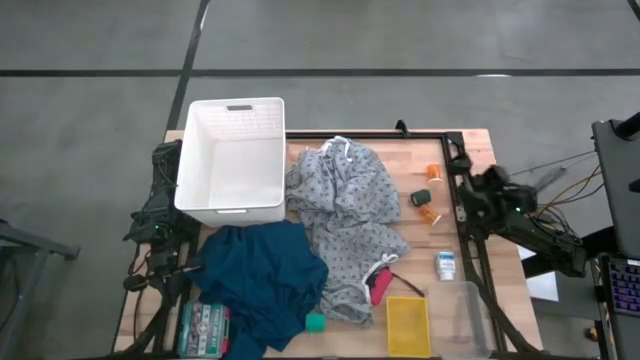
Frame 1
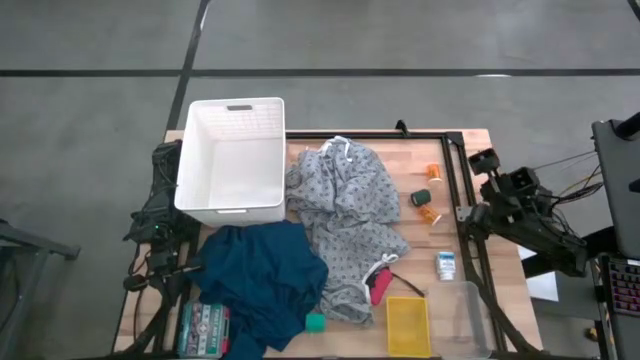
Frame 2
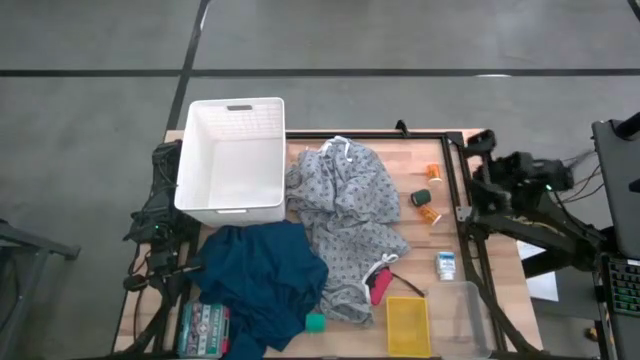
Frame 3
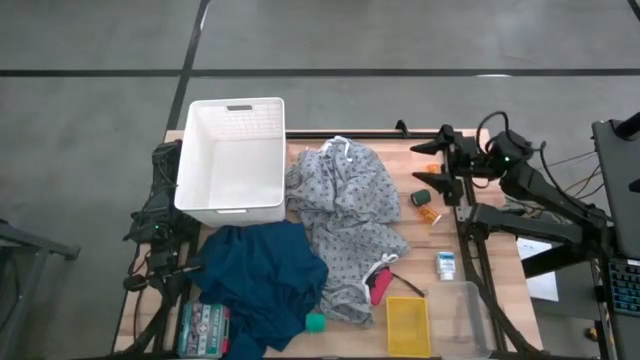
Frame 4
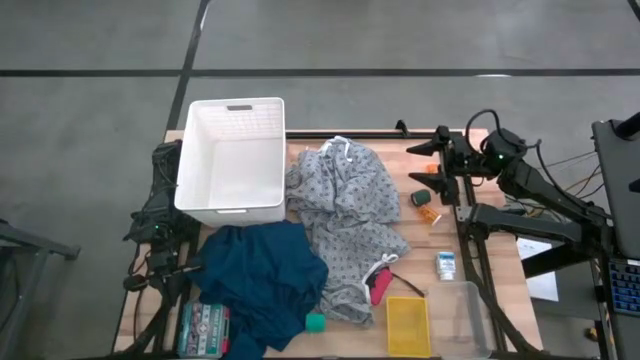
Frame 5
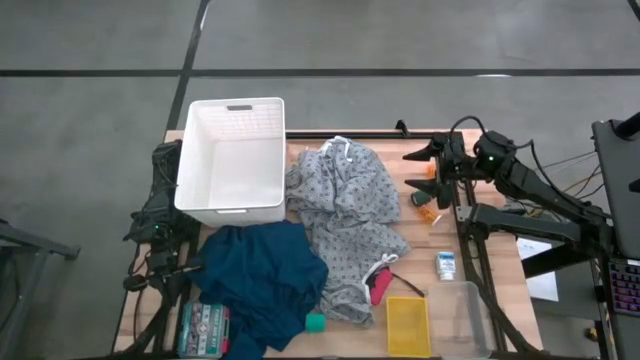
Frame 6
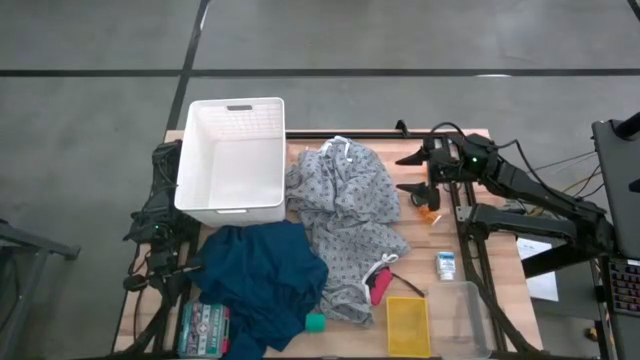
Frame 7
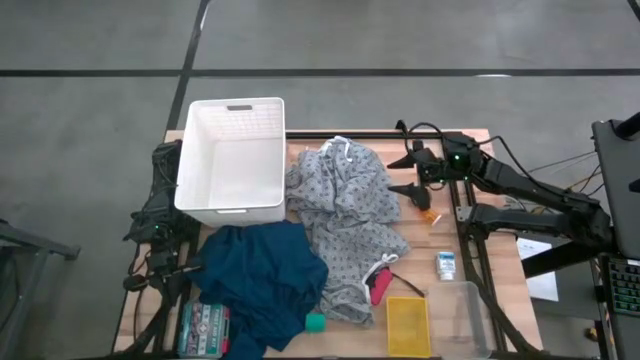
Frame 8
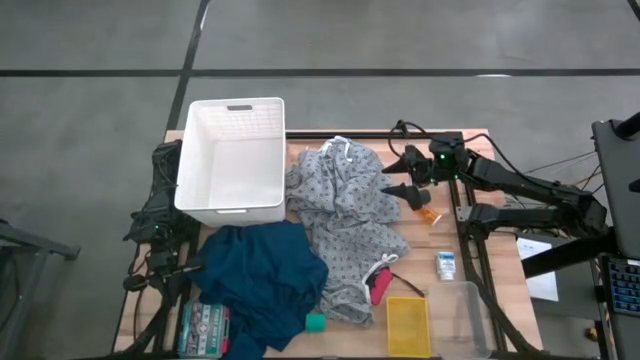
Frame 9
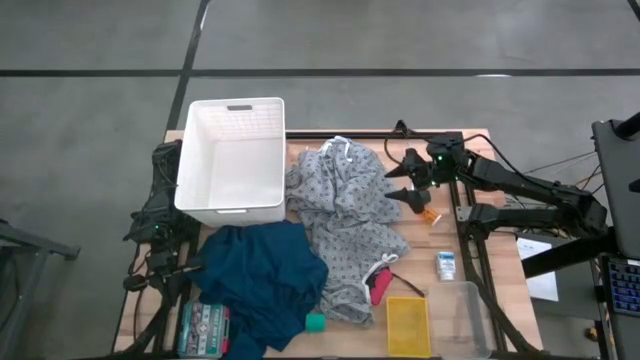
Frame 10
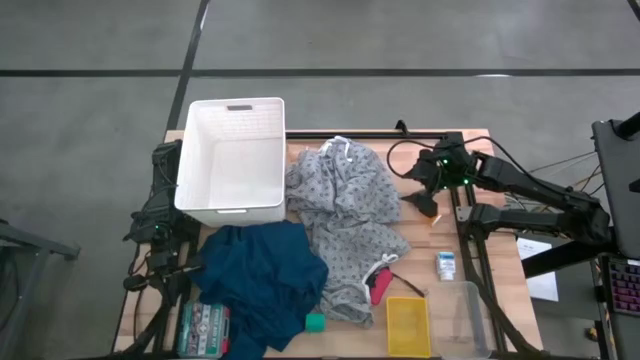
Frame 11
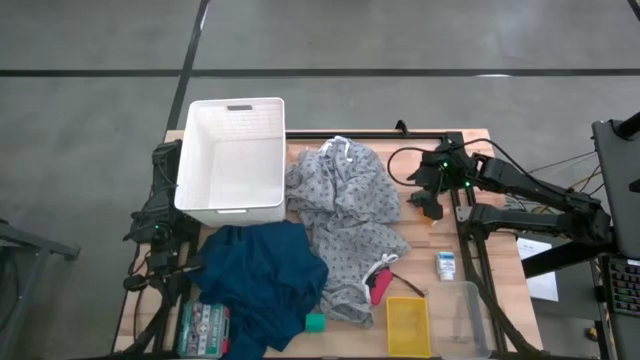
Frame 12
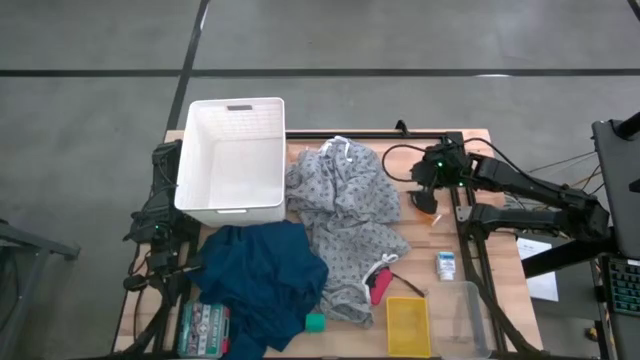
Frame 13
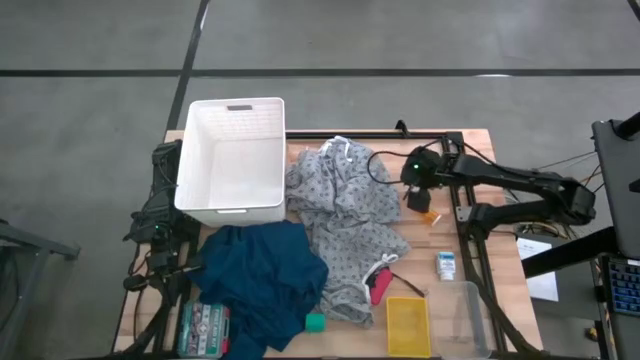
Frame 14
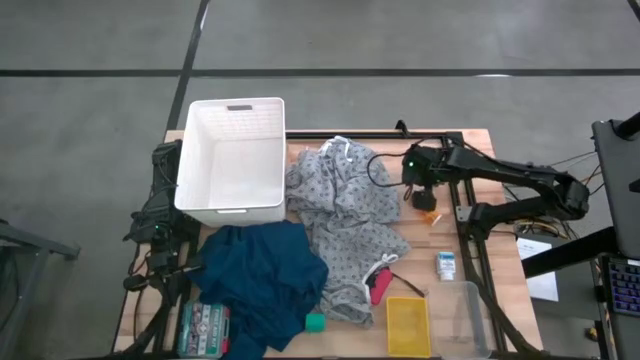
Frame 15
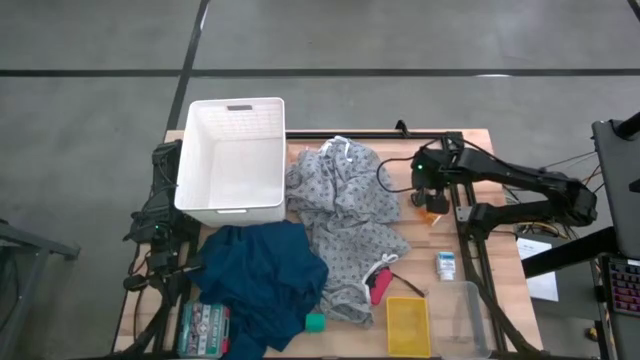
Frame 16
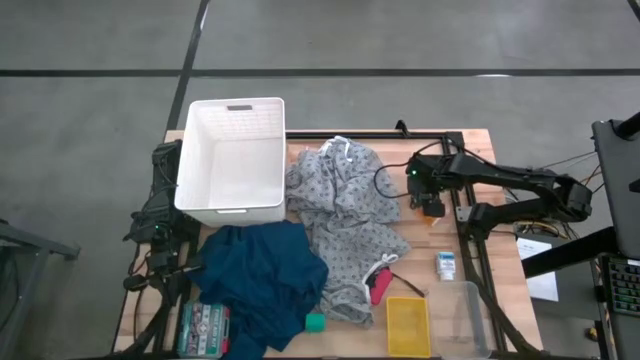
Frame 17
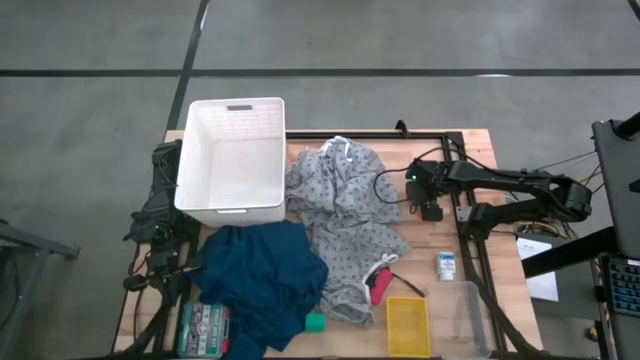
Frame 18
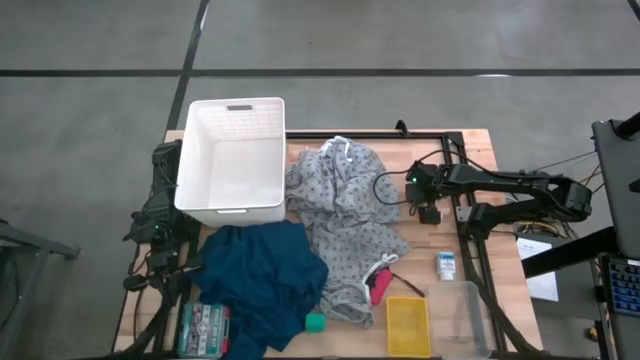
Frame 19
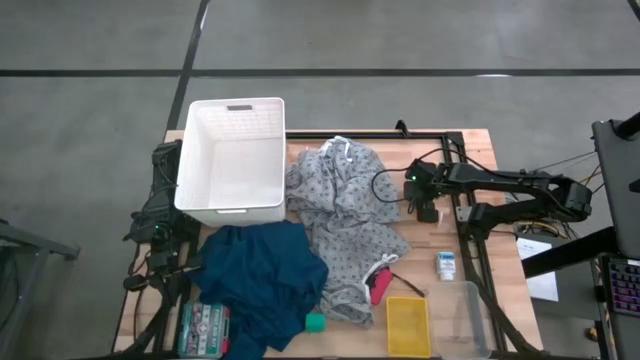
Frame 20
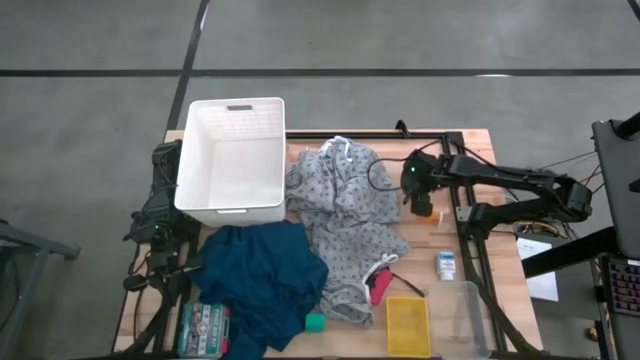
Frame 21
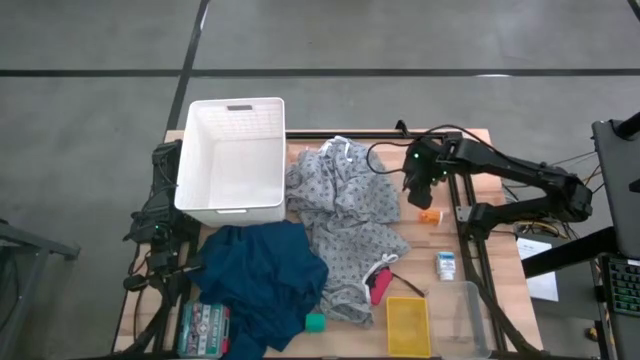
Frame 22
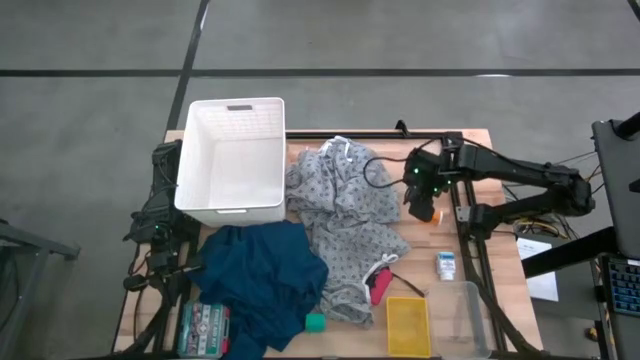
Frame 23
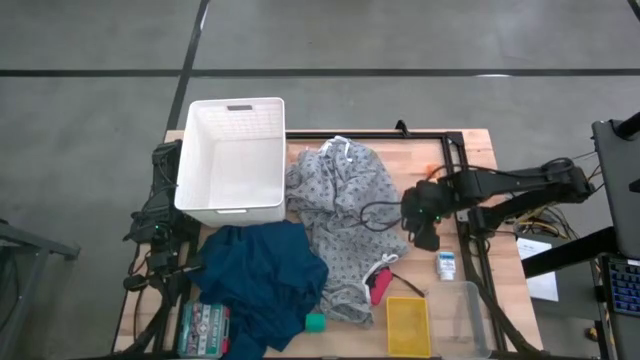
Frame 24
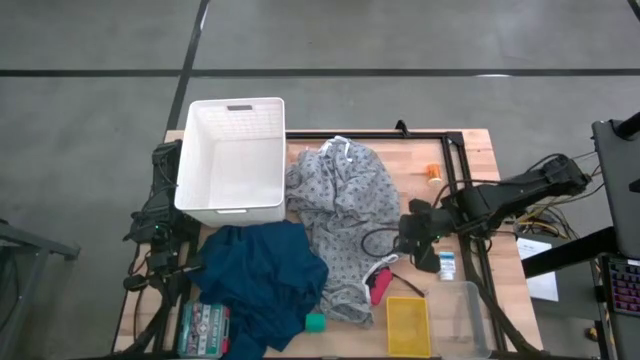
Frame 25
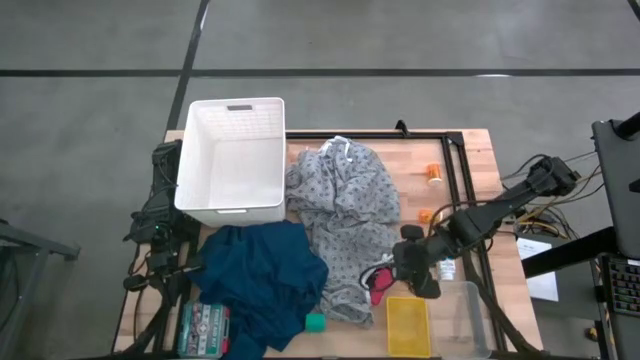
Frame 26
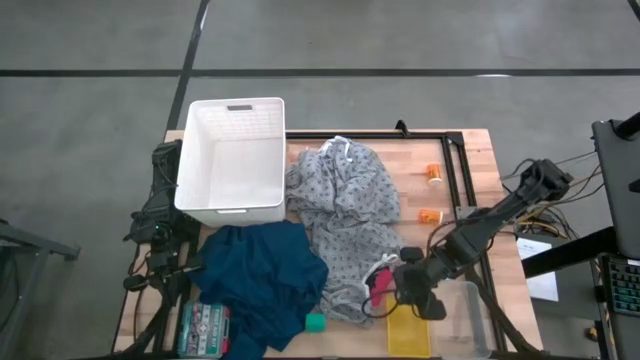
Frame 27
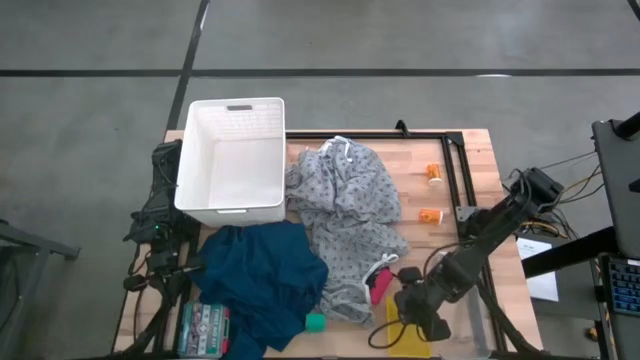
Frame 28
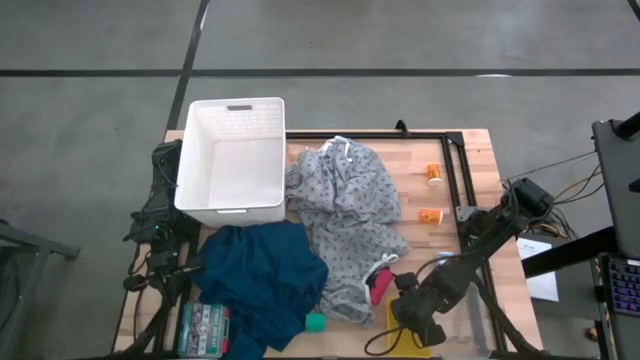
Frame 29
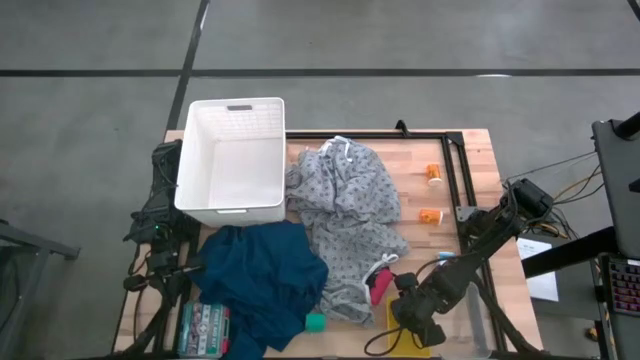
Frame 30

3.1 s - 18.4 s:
Task: Pick & Place Medicine items
Put the black bandage into the yellow bin

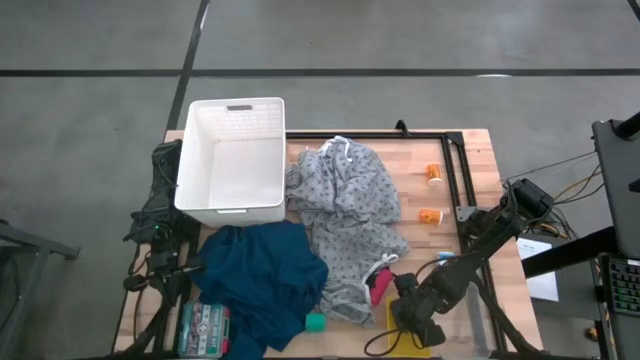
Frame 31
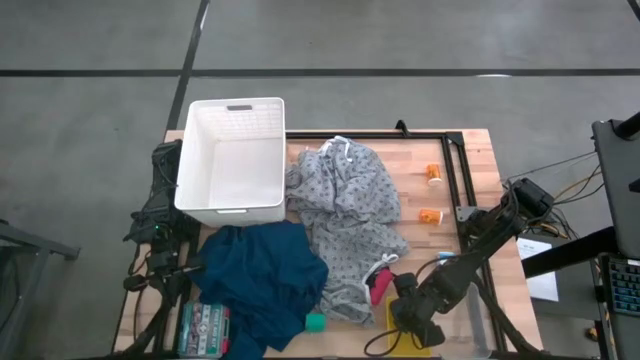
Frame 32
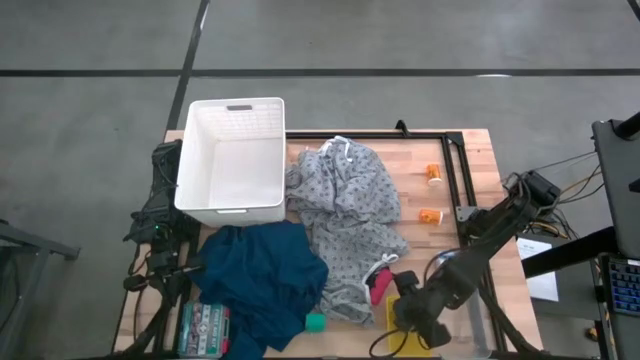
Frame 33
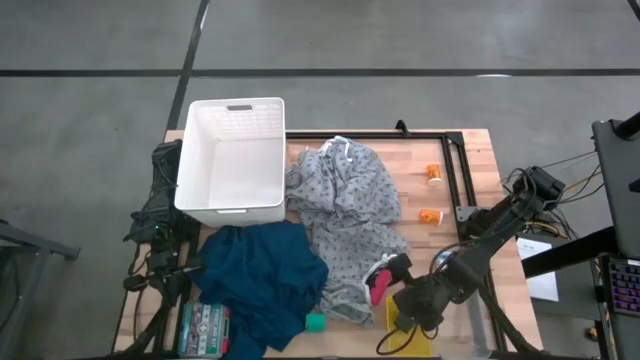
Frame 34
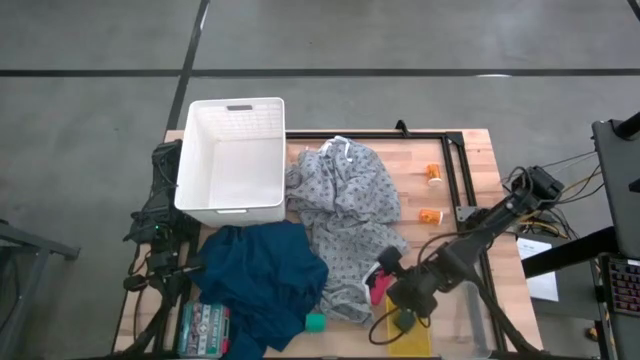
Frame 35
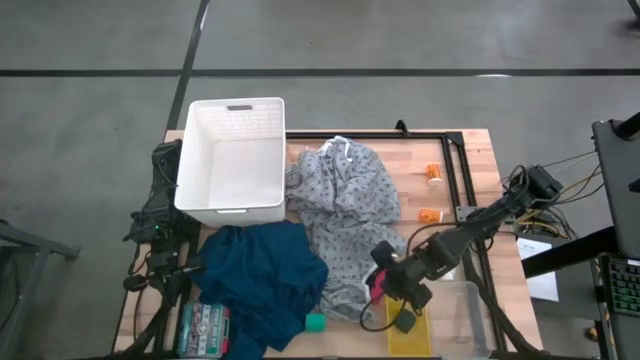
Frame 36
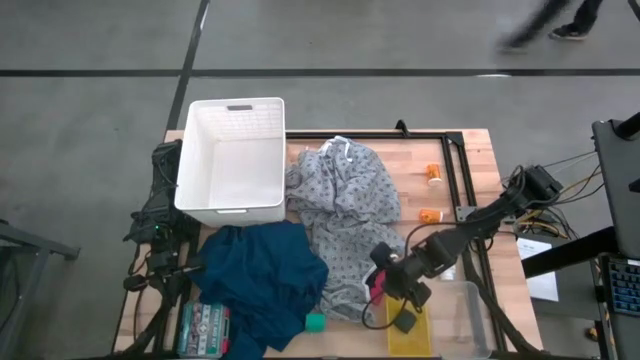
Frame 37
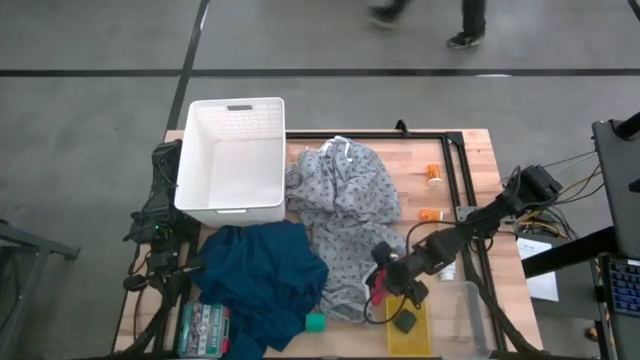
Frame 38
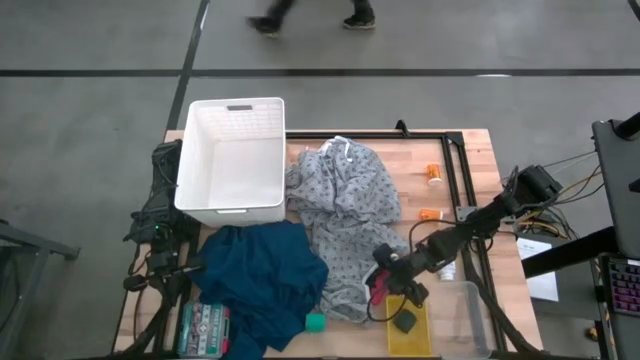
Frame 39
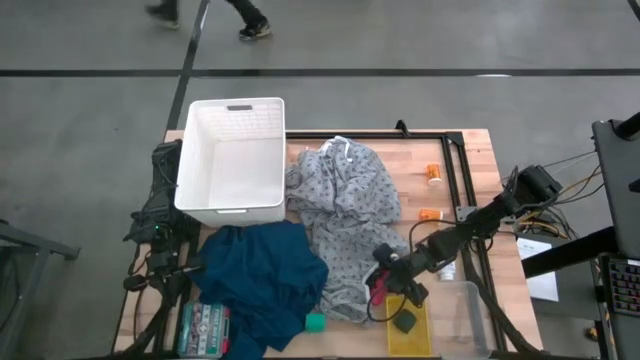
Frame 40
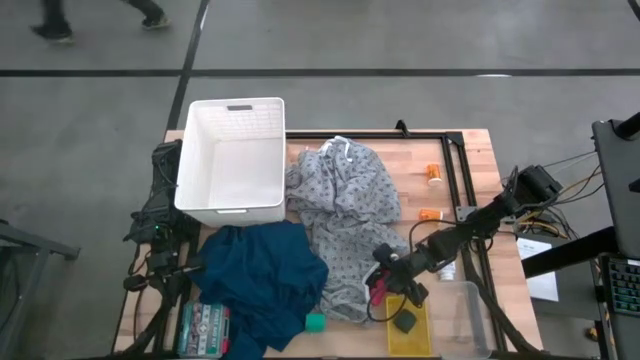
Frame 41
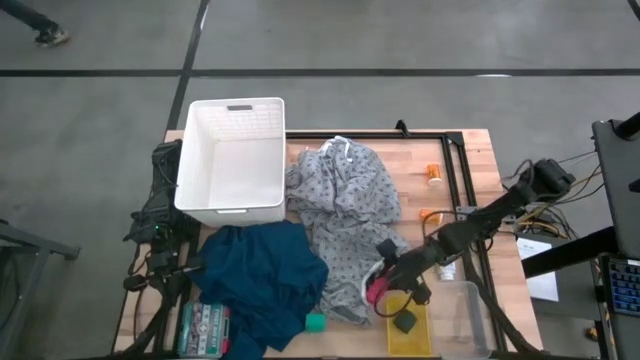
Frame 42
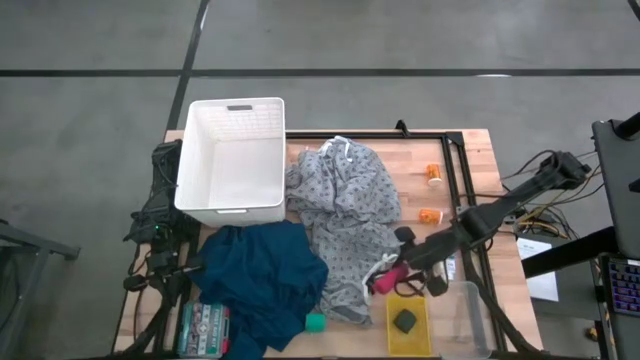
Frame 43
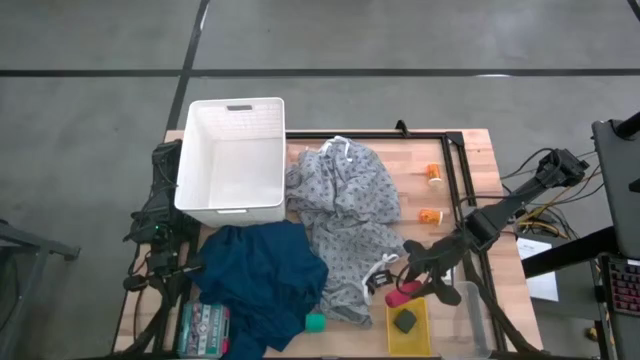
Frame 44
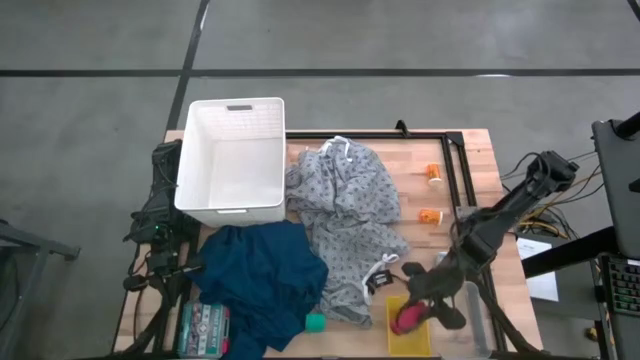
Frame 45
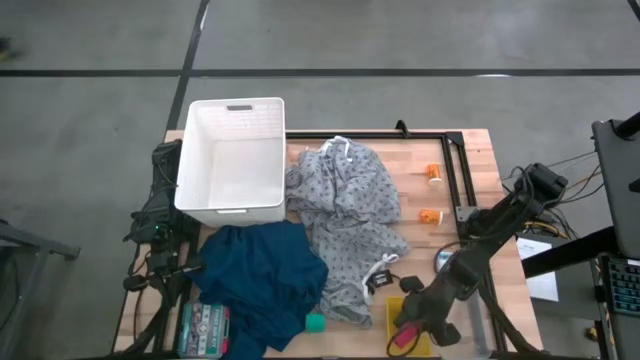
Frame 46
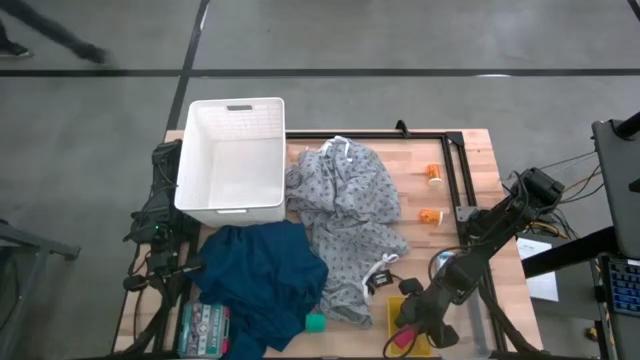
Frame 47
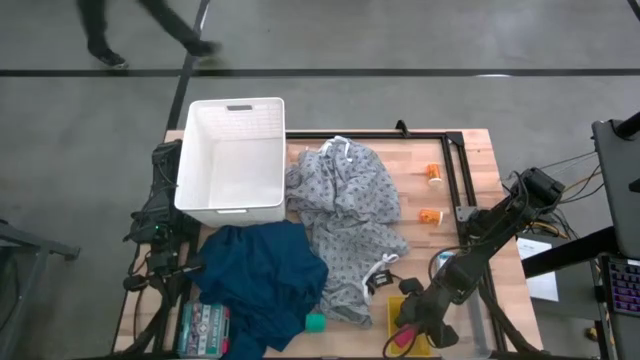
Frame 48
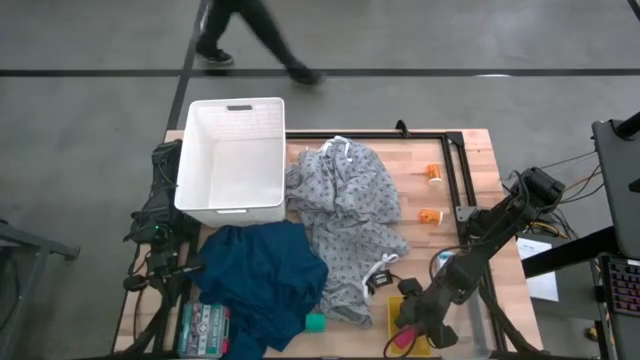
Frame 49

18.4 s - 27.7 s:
Put the pink bandage into the yellow bin
